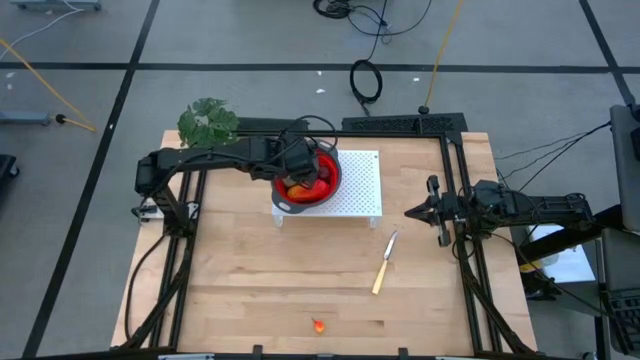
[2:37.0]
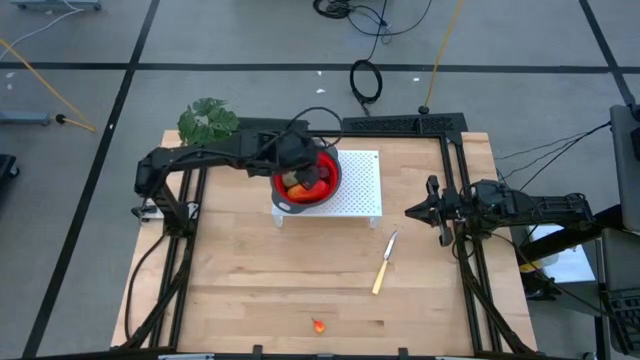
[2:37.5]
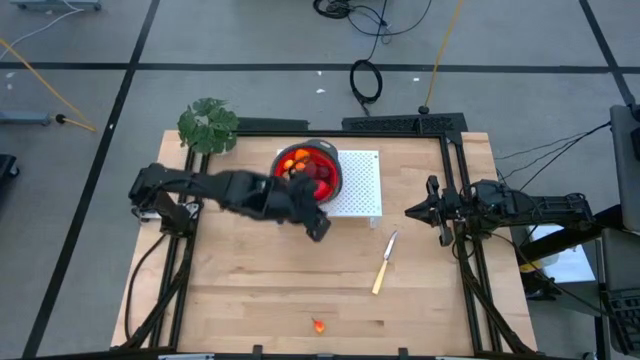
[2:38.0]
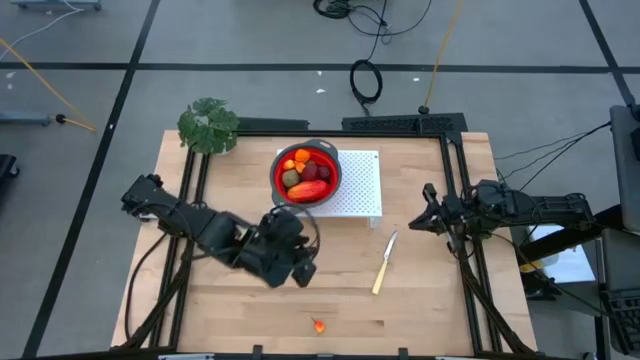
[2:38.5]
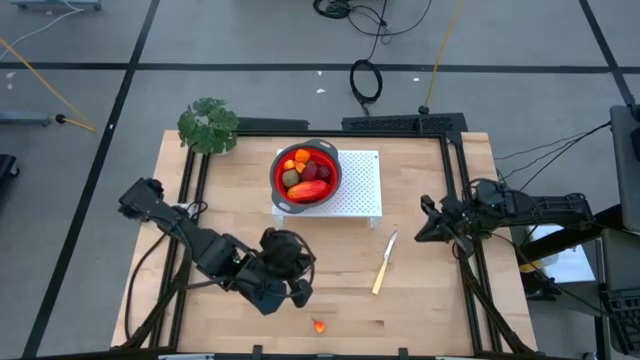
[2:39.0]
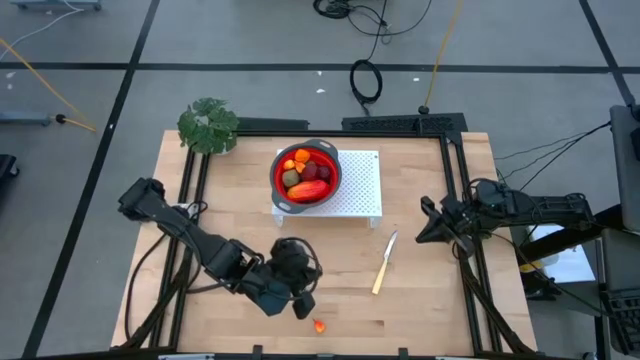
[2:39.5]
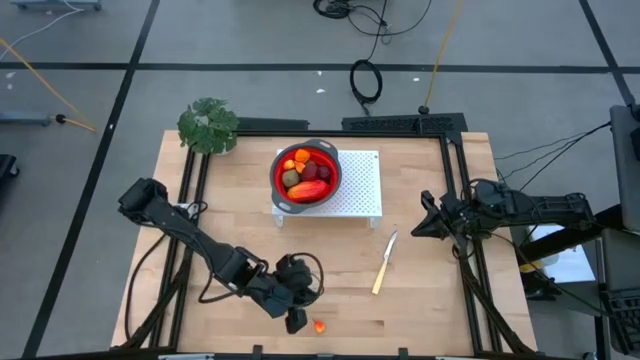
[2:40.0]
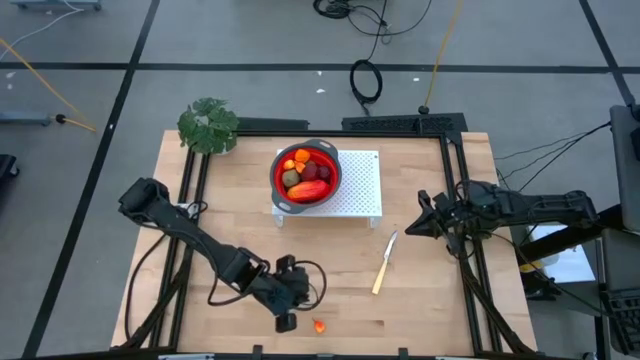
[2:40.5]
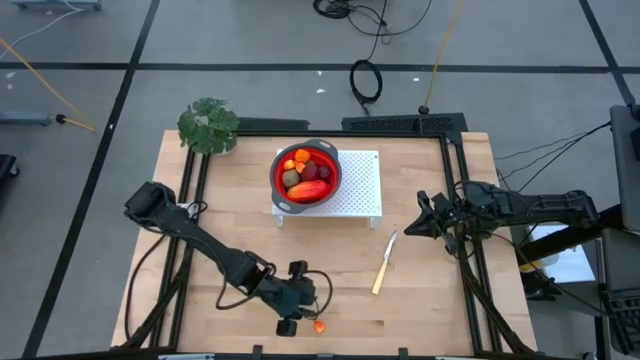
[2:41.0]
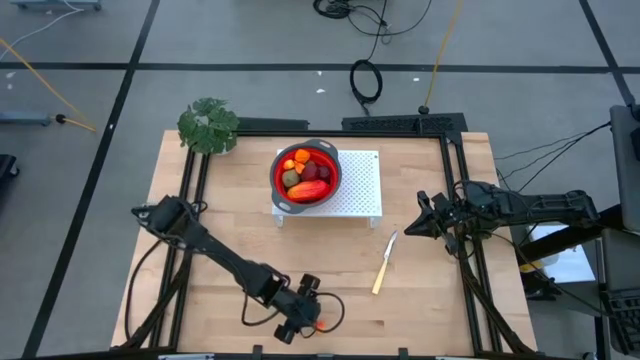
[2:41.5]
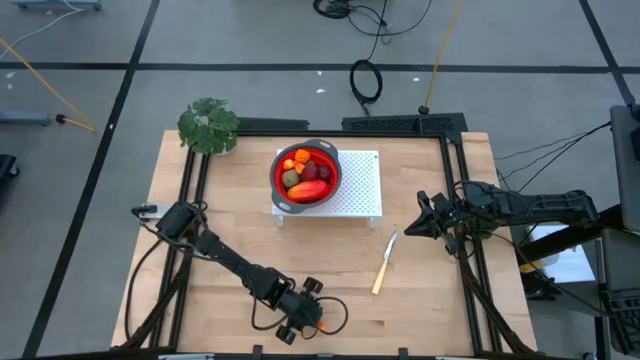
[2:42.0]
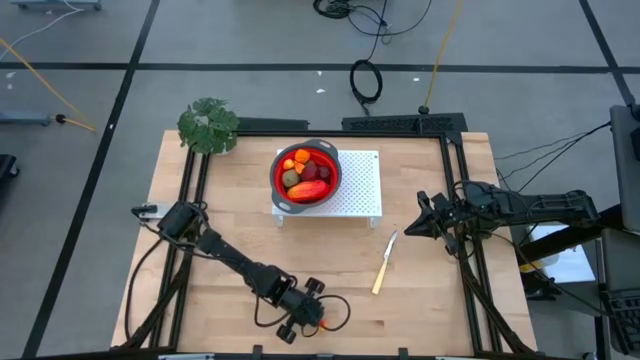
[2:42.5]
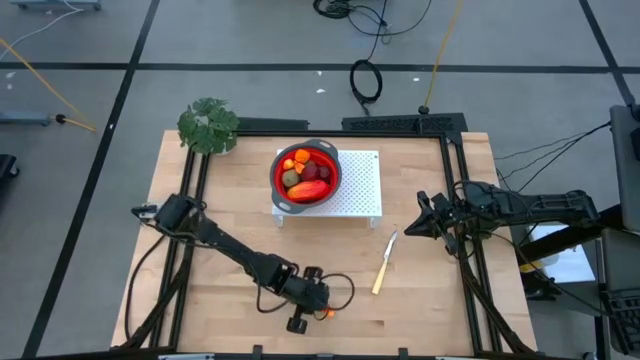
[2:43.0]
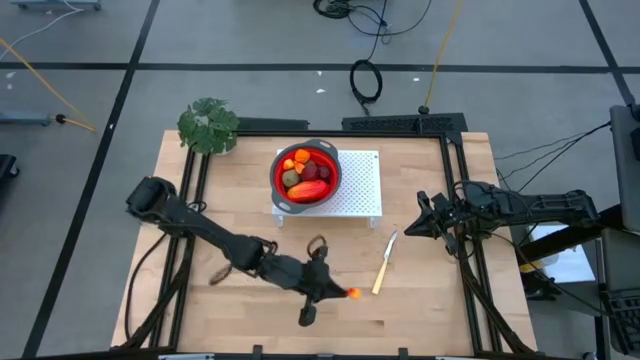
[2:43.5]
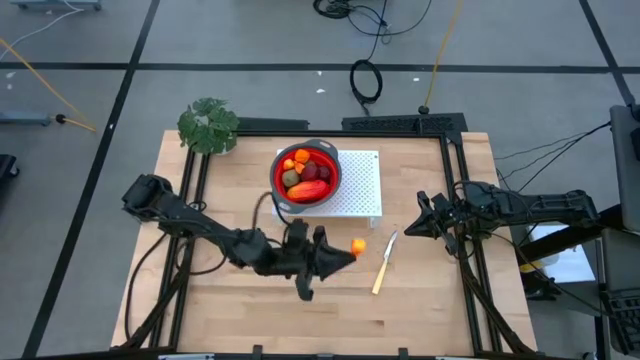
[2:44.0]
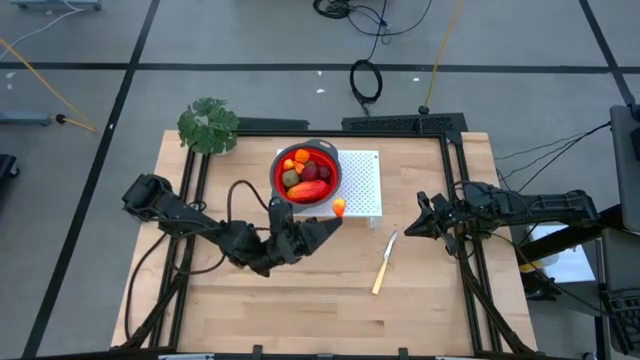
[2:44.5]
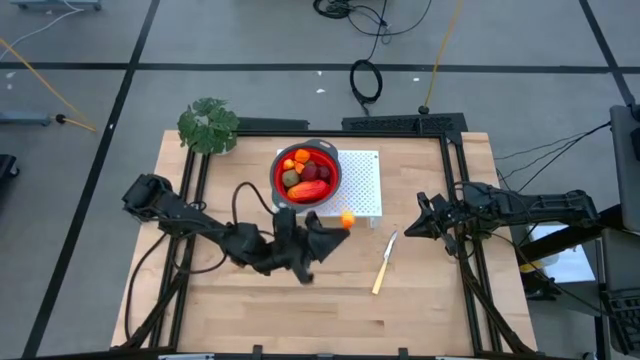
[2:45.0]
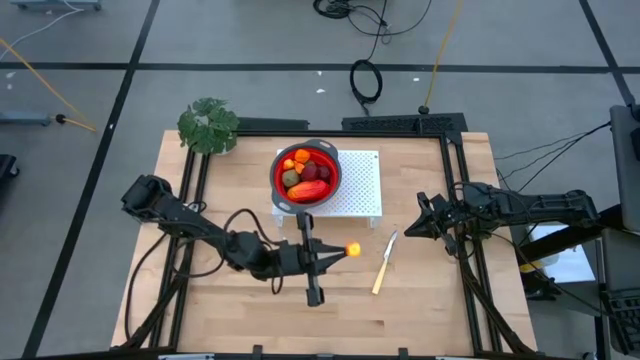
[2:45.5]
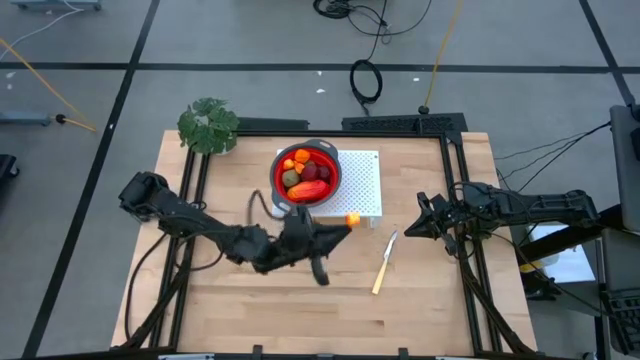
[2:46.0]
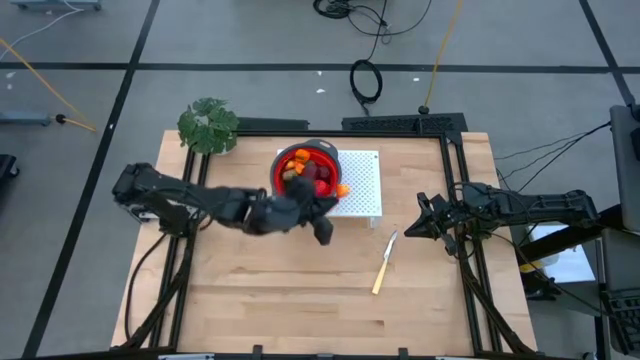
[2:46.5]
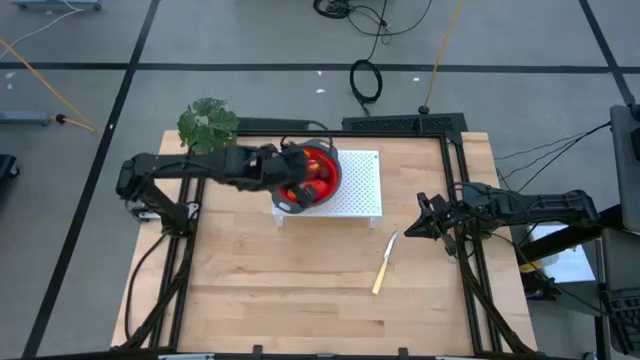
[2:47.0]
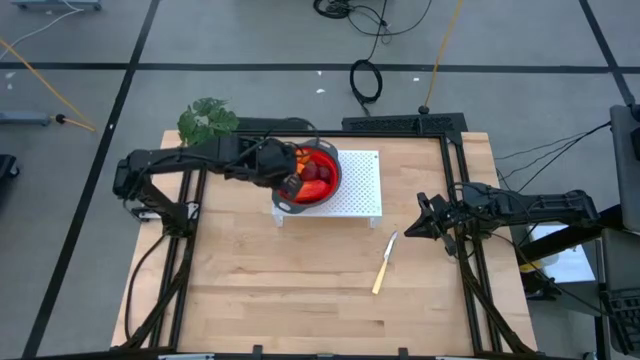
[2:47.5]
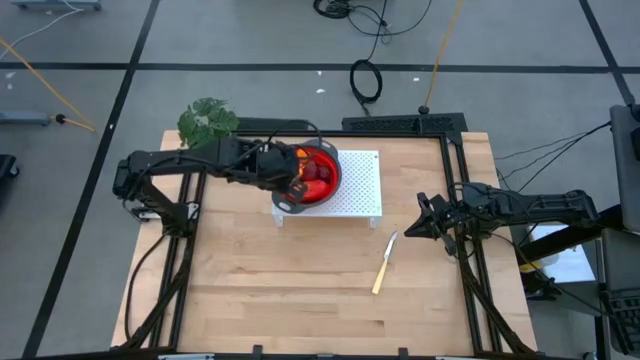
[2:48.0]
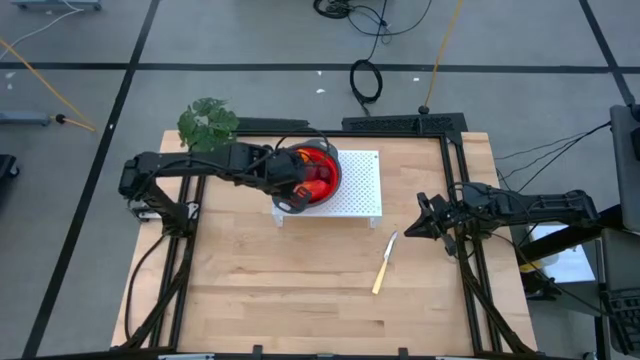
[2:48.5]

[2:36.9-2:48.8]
Task: Pick & Place Fruit
Put the orange peach into the orange strainer bowl on the shelf

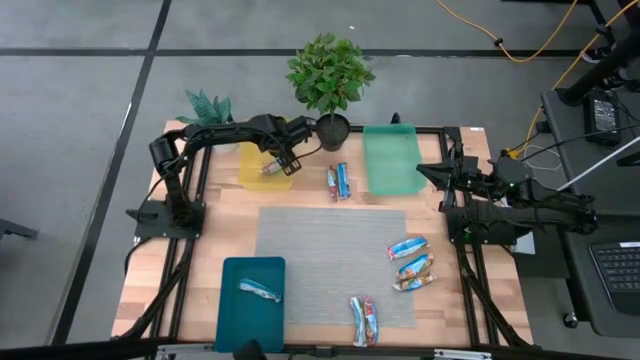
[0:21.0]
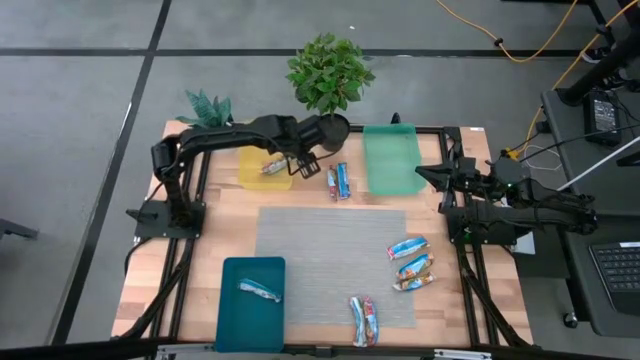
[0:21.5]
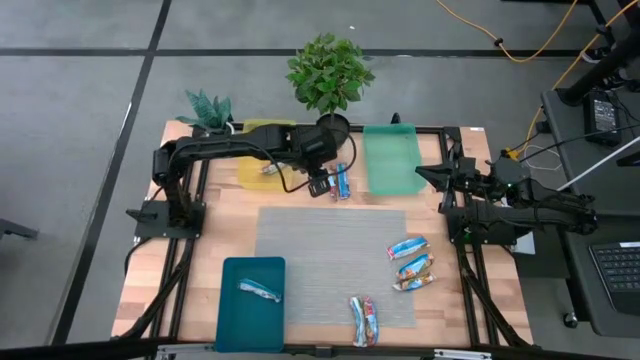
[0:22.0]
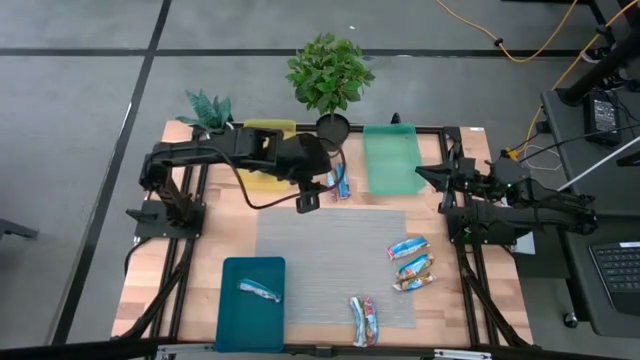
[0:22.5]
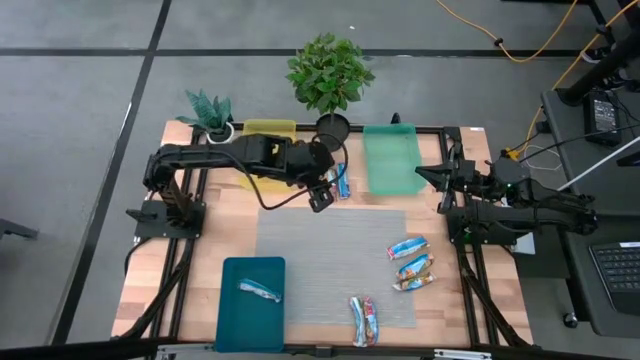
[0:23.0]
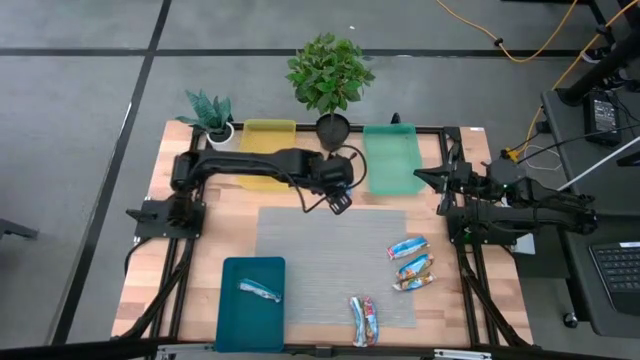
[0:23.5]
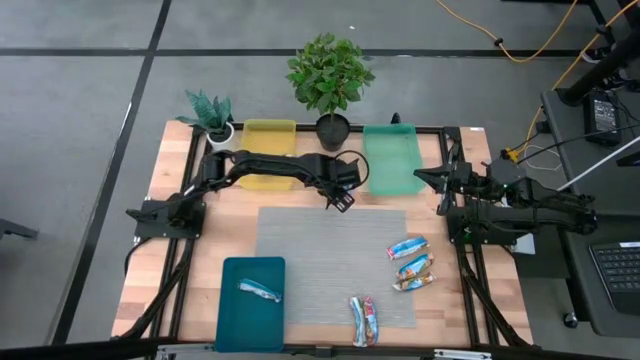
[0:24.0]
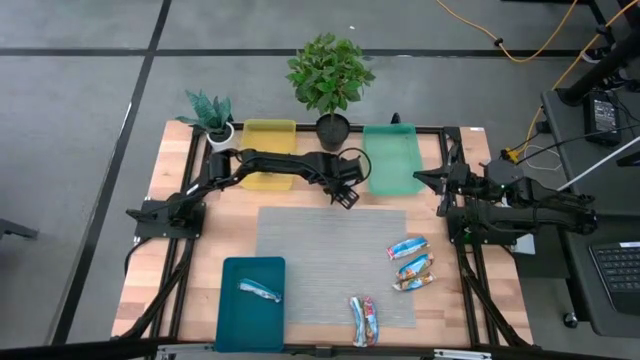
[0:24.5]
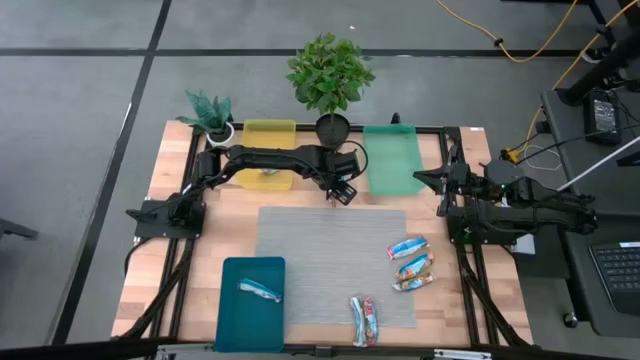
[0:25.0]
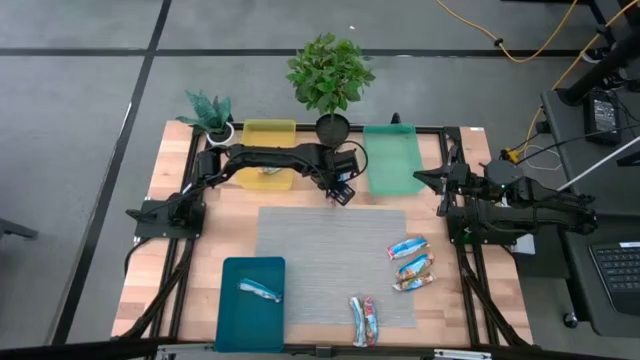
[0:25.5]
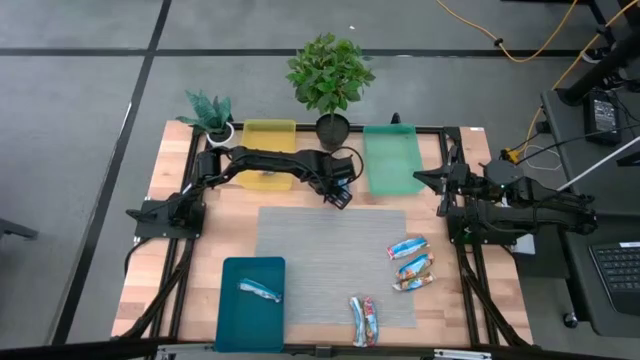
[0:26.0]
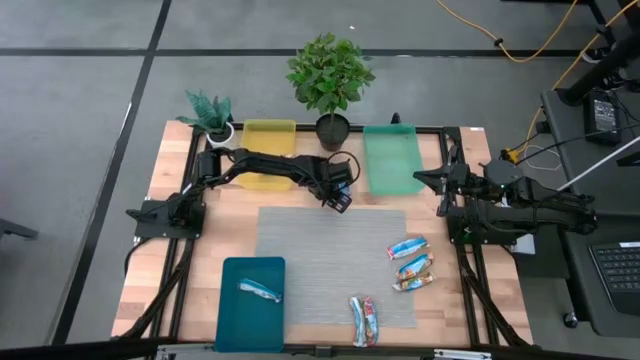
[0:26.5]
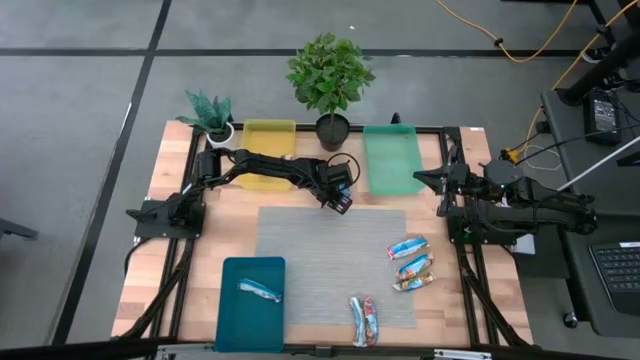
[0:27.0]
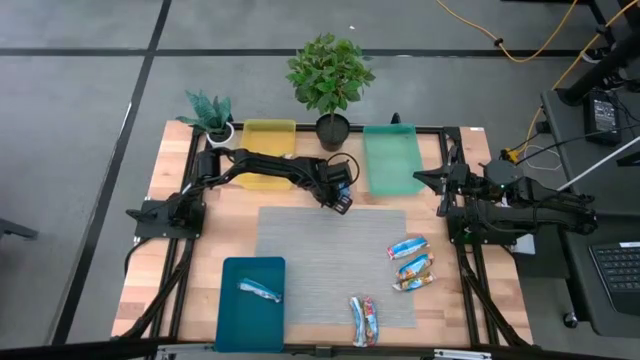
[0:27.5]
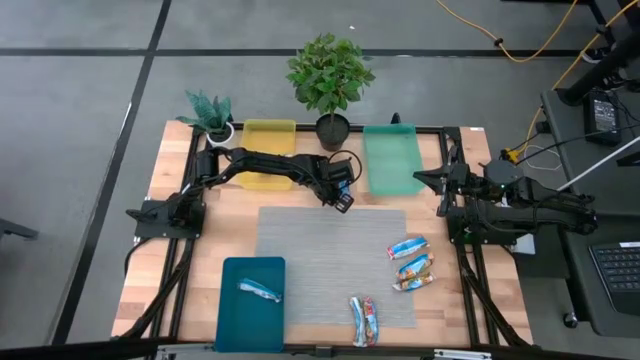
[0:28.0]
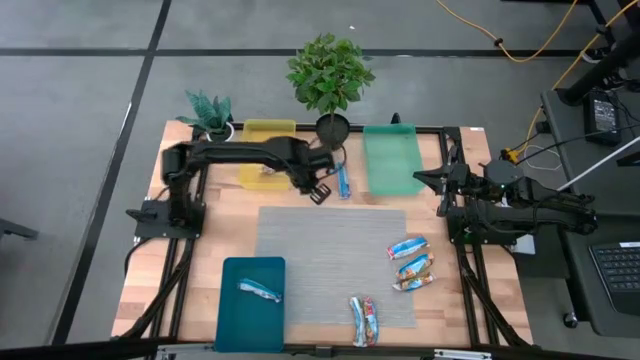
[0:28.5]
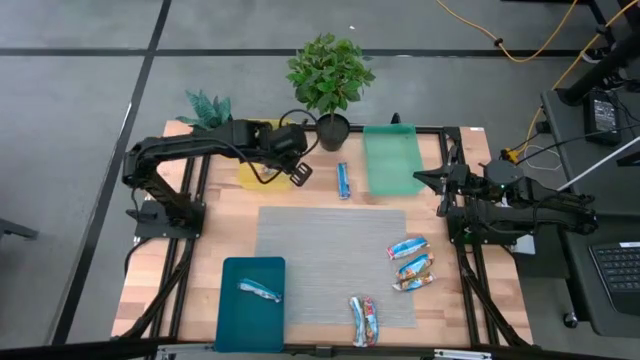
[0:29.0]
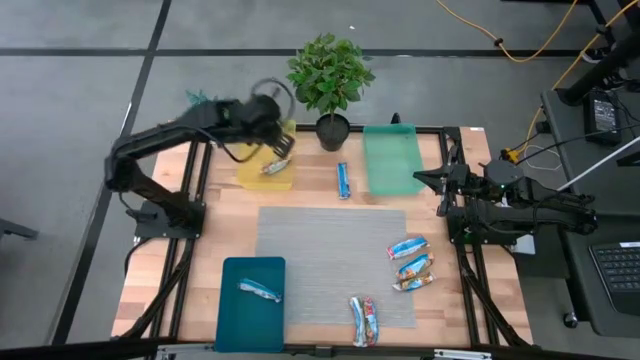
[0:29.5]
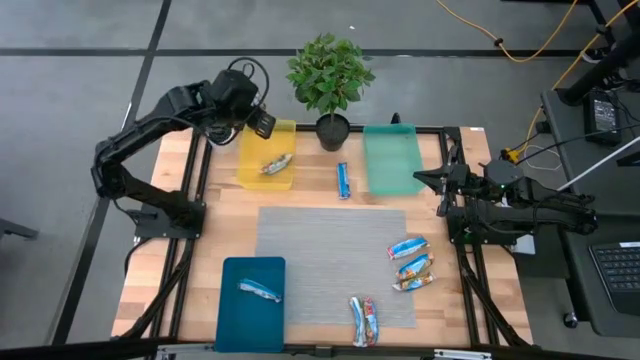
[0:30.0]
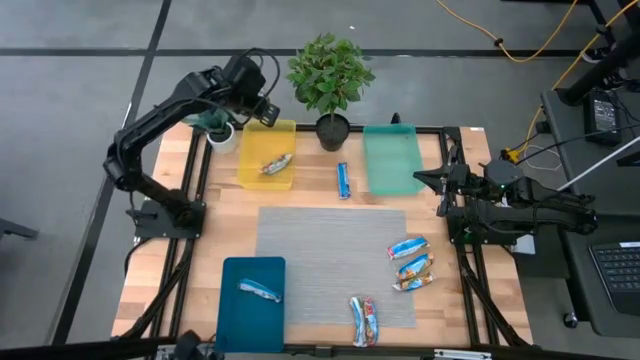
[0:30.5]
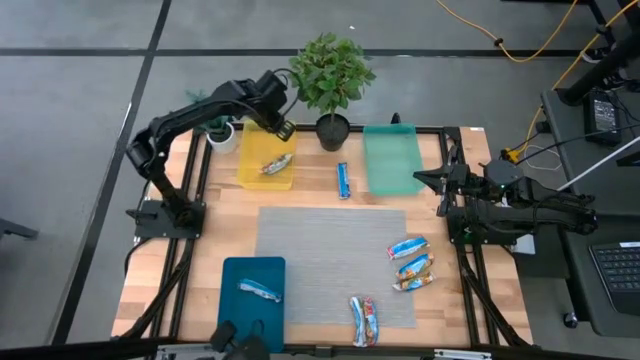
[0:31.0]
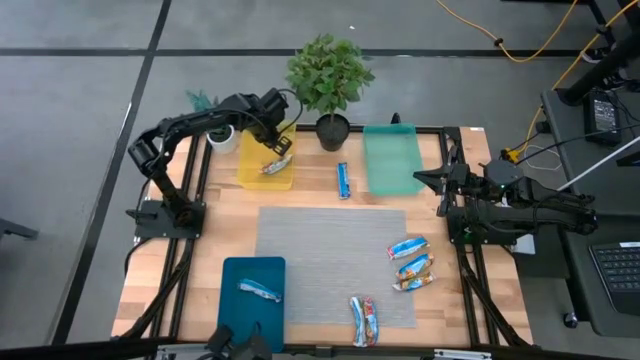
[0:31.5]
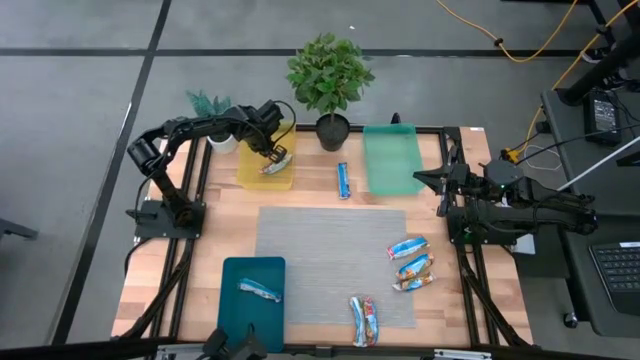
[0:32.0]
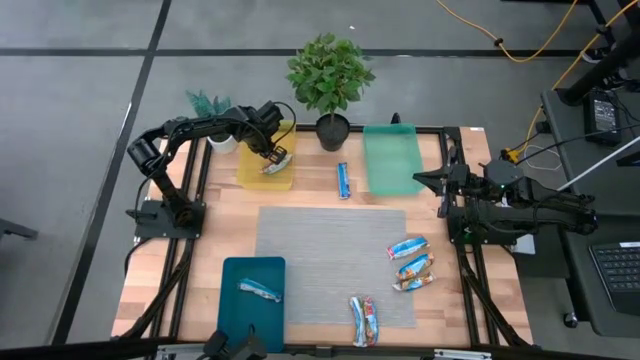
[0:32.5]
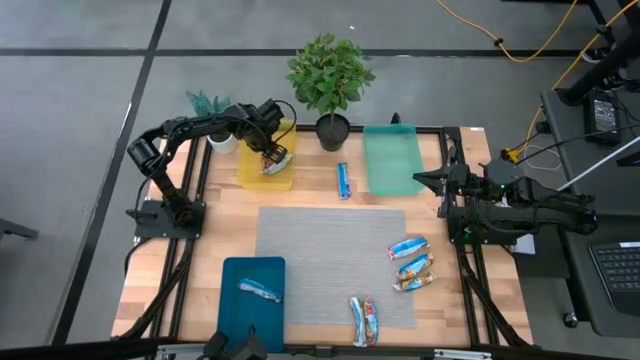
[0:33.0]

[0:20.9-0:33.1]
Task: Pick and place Granola Bars by type
Put the red granola bar into the yellow transparent bin
